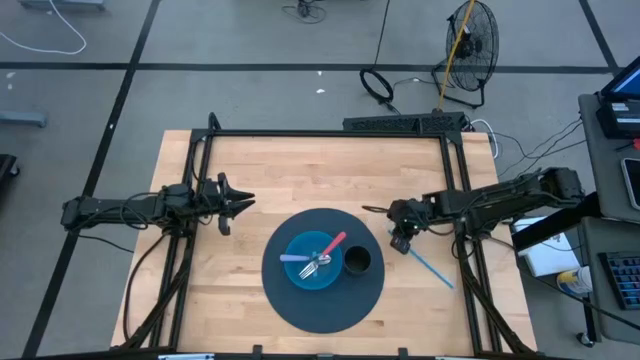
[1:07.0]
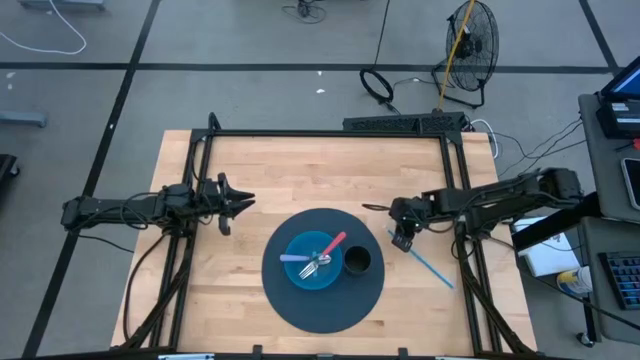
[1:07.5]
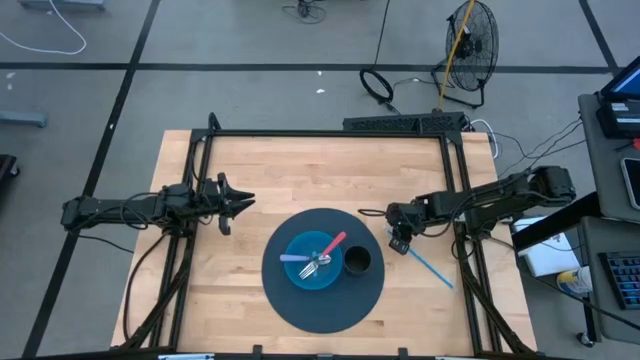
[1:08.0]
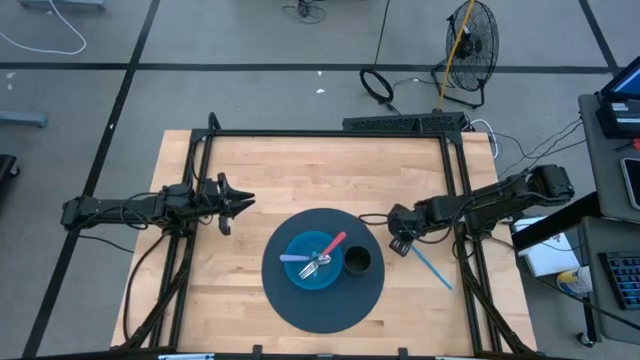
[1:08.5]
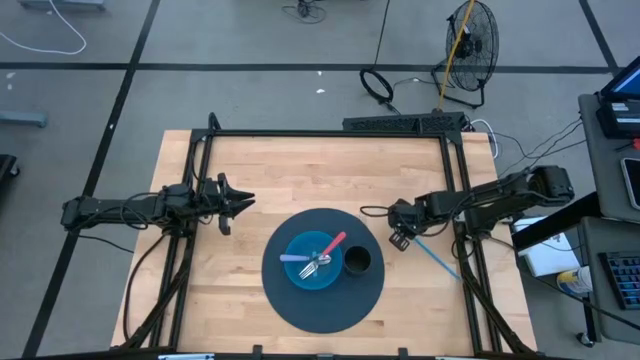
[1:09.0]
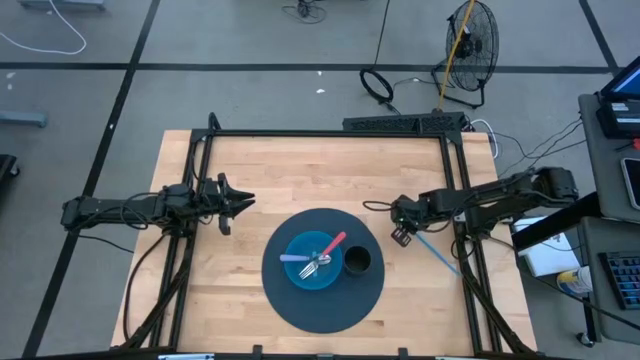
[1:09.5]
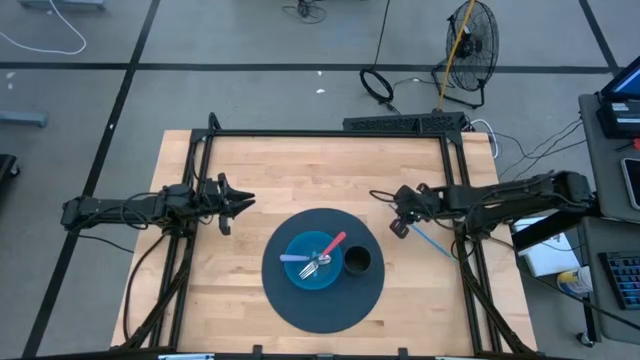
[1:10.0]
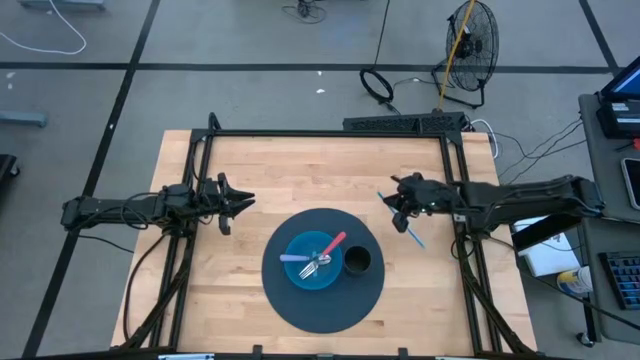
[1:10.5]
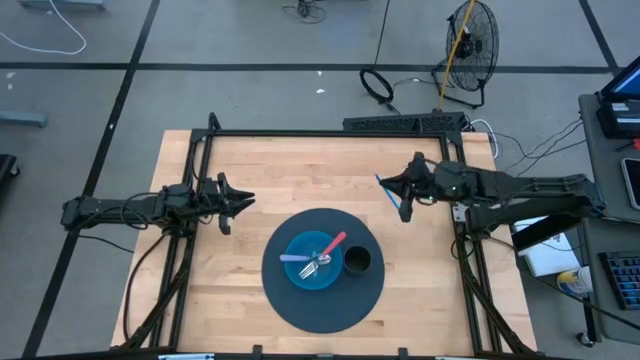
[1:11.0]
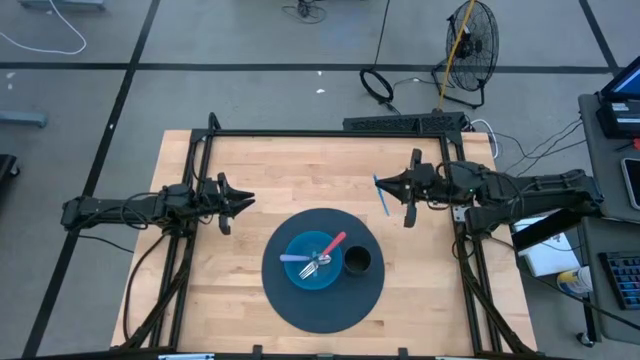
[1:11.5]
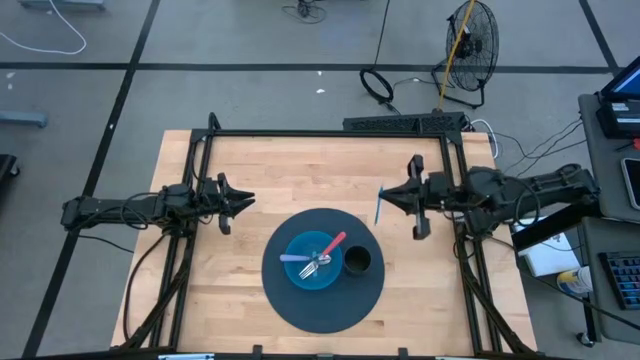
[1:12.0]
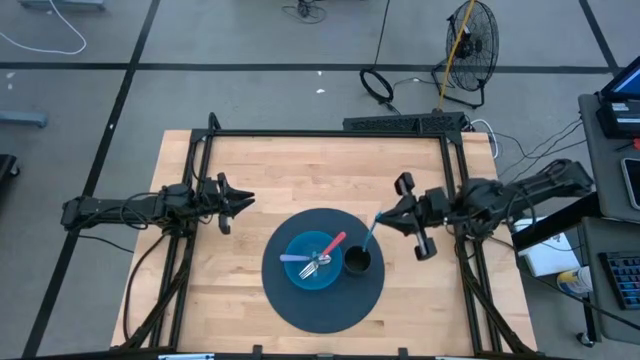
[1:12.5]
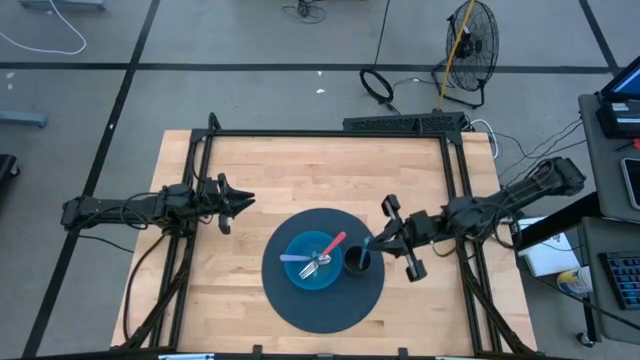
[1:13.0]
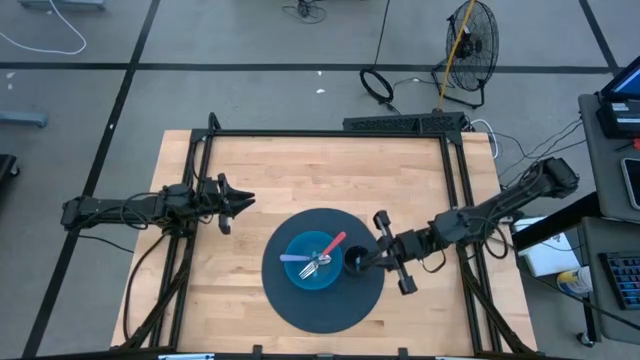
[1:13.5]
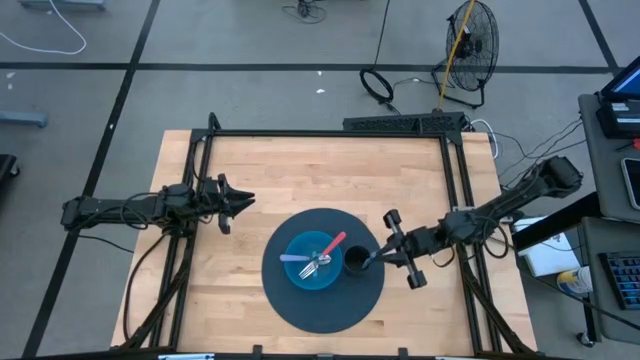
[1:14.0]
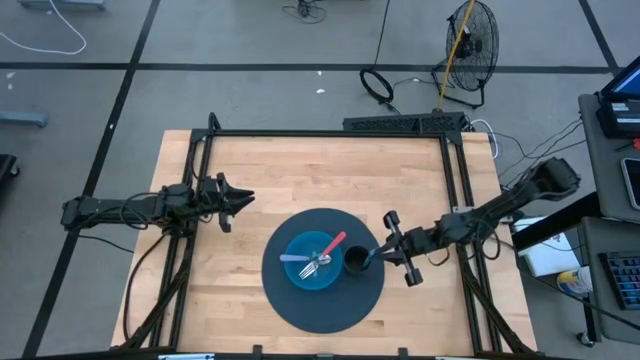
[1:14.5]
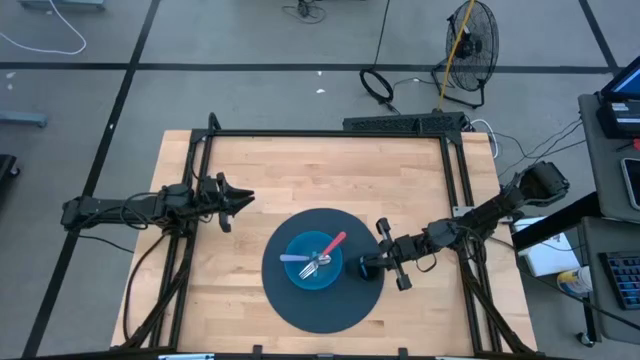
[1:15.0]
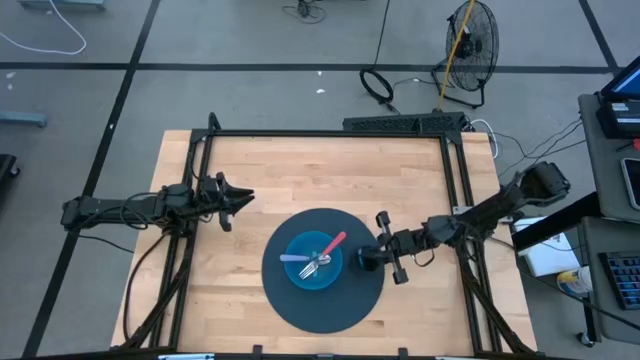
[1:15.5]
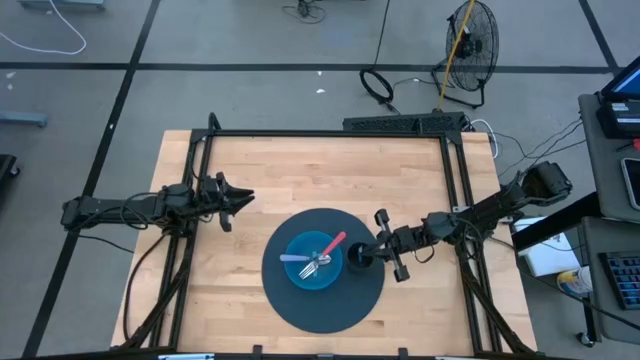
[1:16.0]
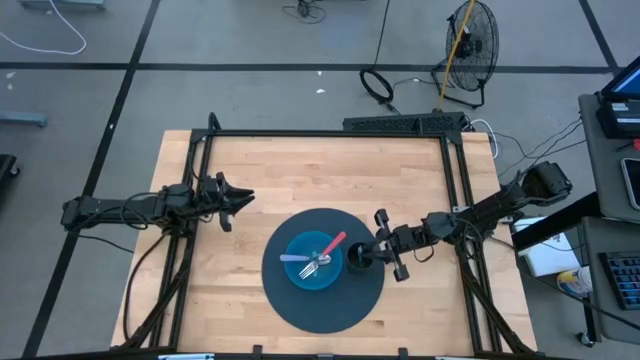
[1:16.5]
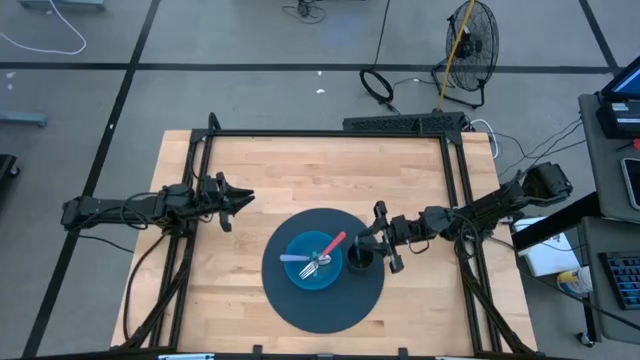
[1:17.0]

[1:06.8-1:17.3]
Task: Pick & Place Utensil
Put the blue straw into the black cup on the blue mat

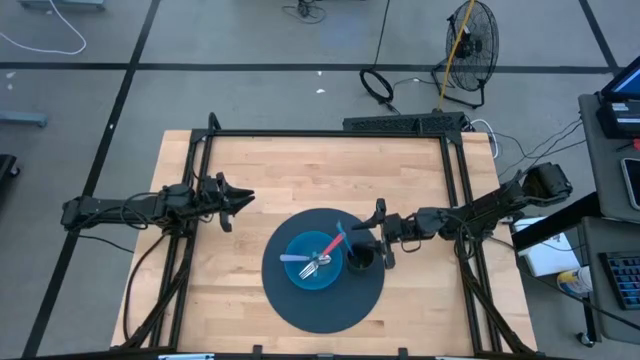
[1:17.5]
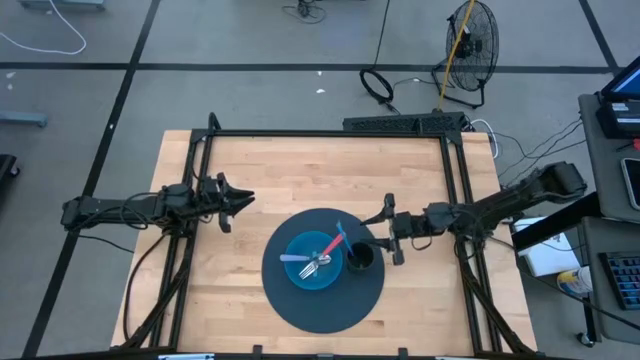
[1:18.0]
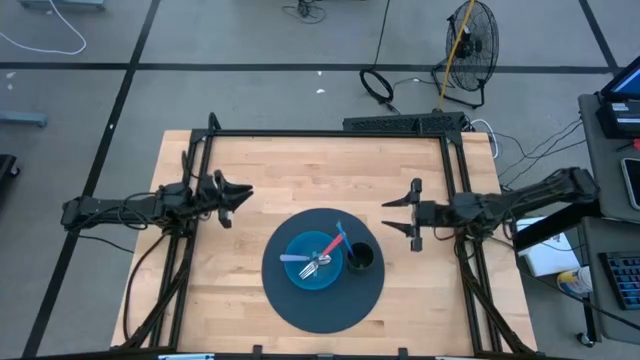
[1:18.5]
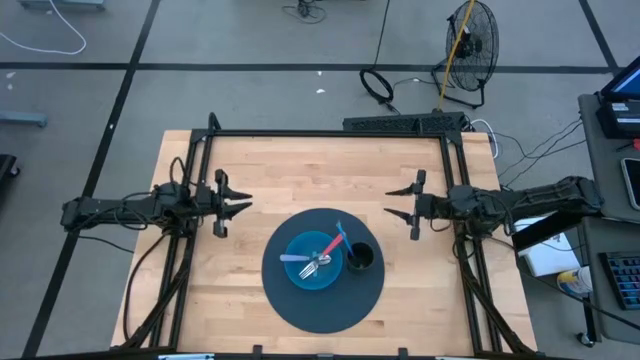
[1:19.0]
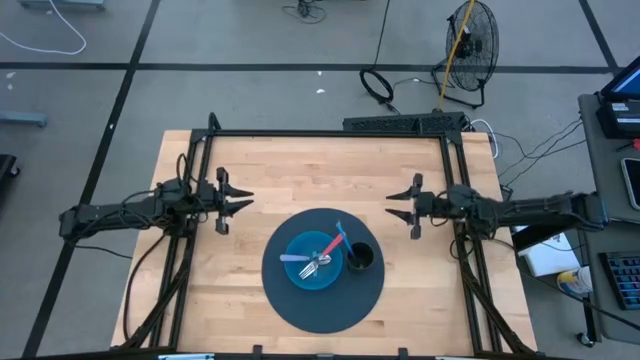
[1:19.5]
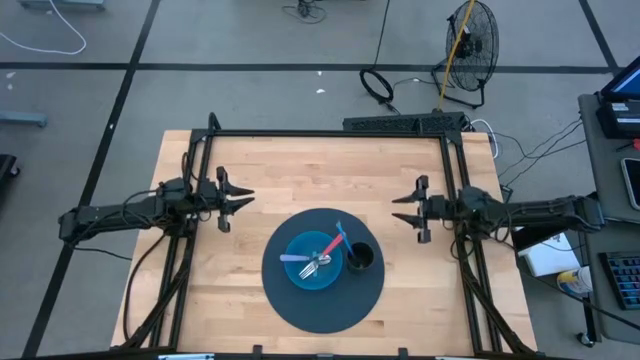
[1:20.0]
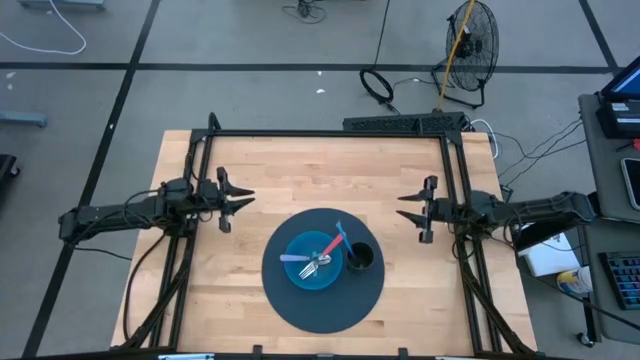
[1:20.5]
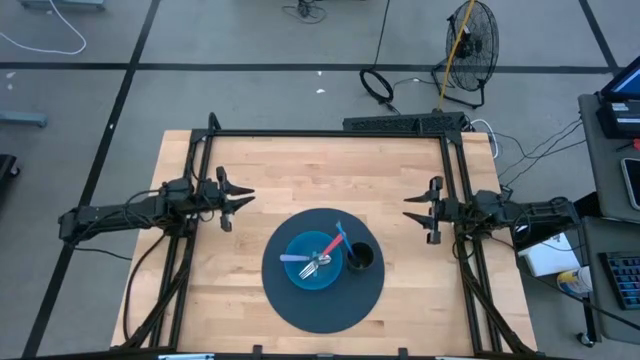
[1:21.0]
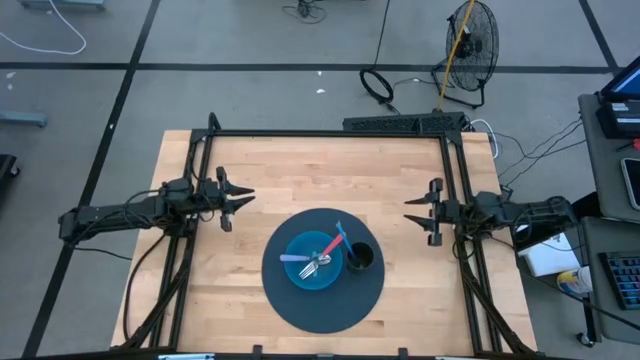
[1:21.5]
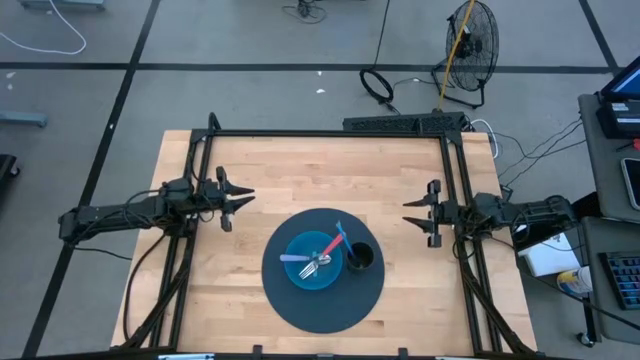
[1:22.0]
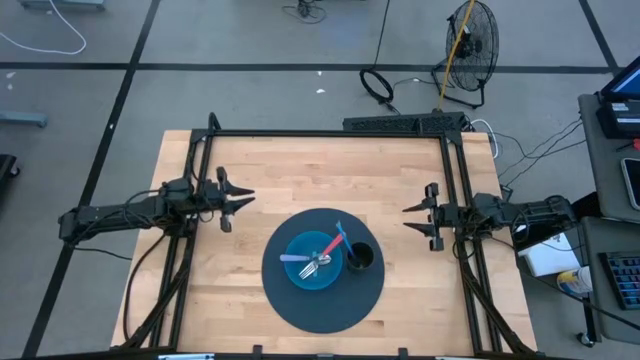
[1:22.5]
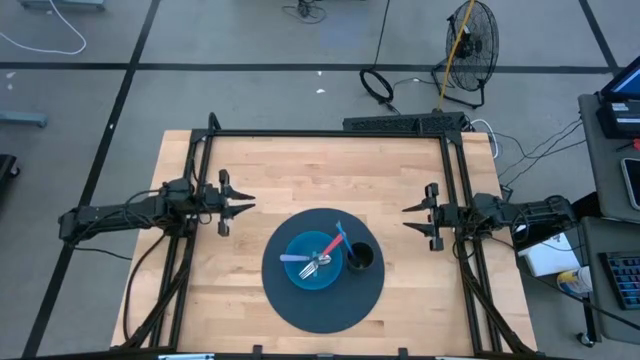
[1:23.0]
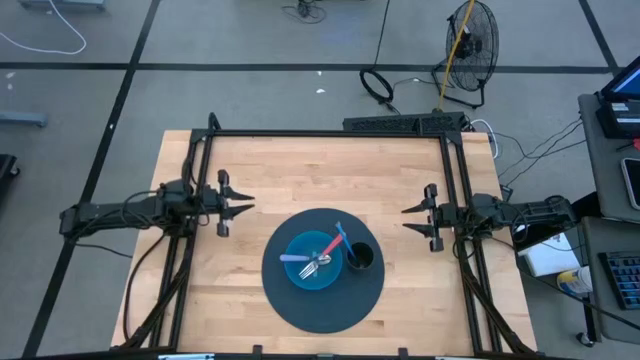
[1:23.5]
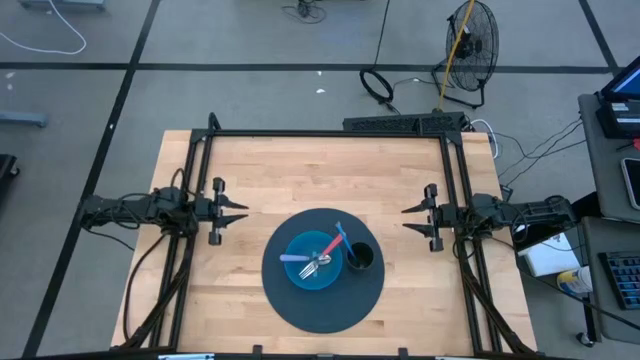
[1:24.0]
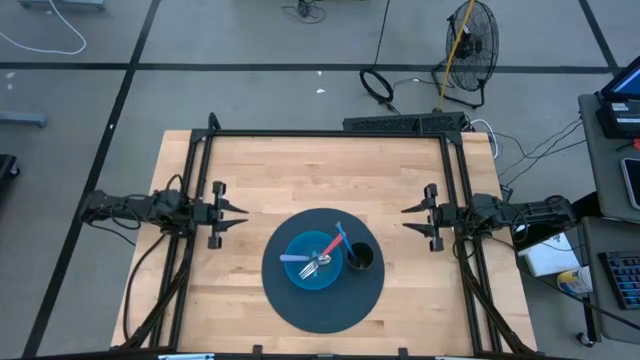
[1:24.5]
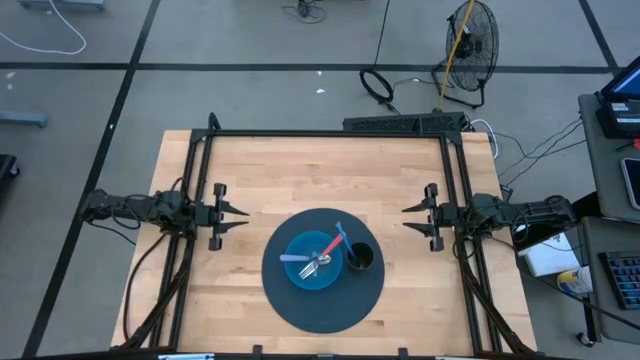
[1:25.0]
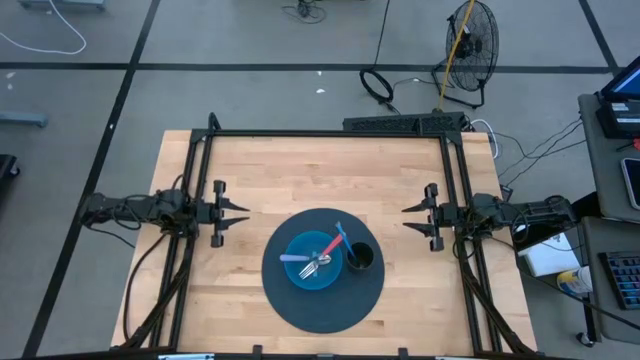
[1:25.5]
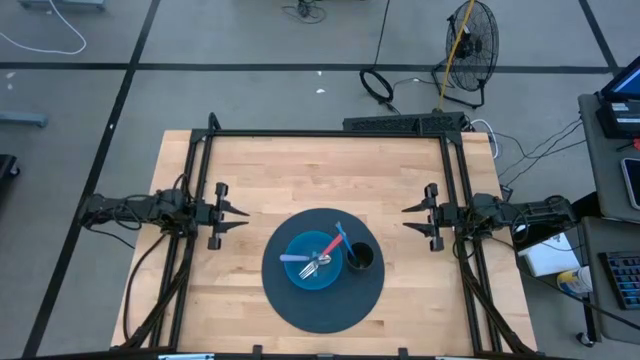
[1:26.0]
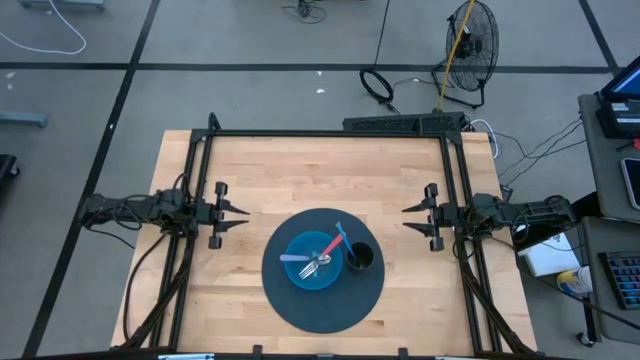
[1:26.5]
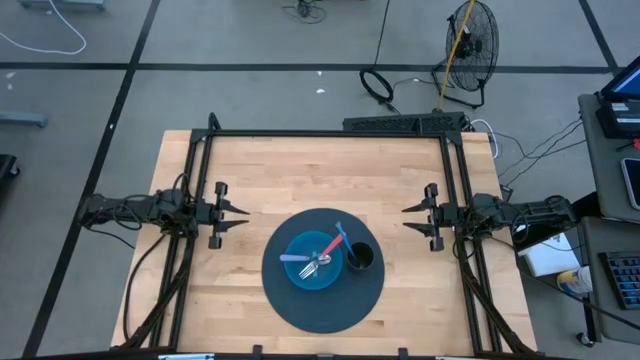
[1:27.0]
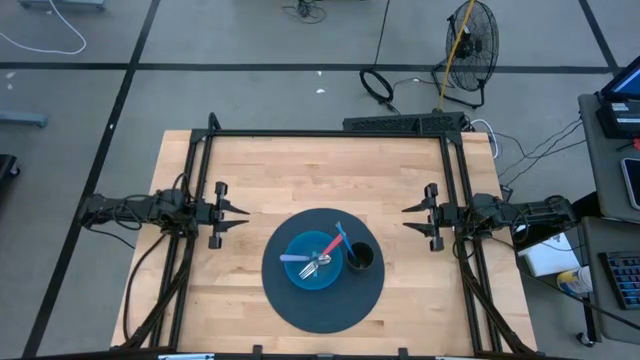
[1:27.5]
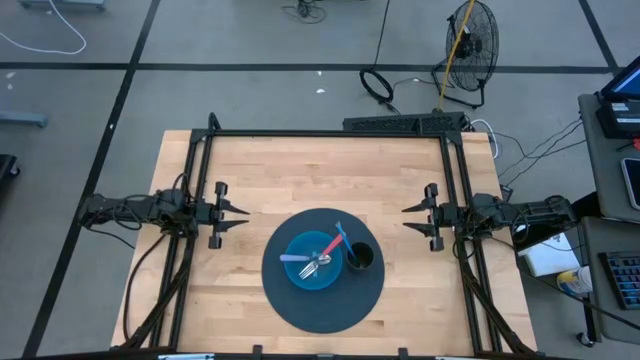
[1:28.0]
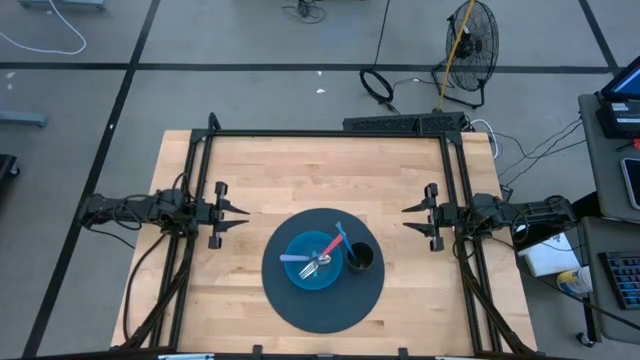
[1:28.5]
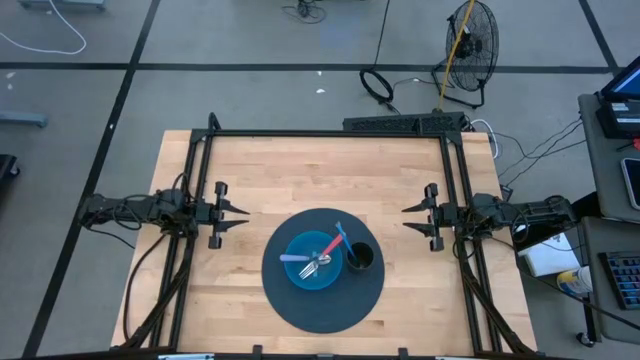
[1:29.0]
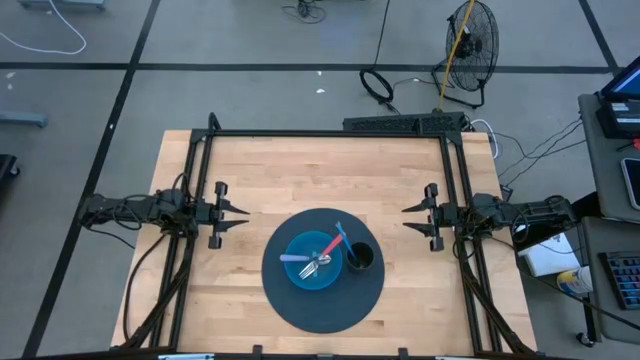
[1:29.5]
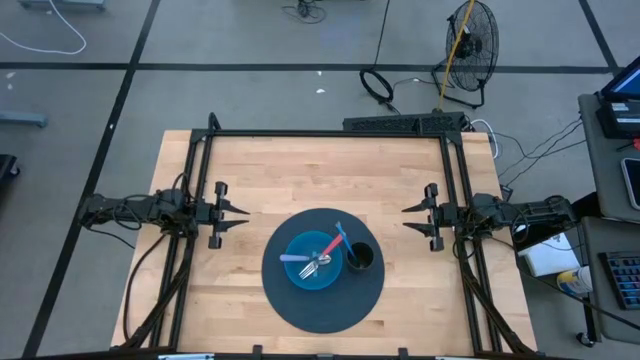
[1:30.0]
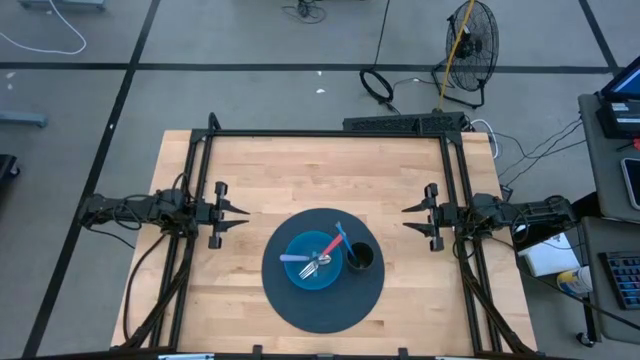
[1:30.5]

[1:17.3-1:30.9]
Return to Home Position
